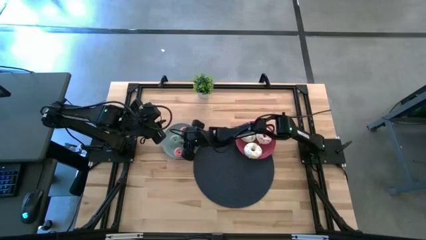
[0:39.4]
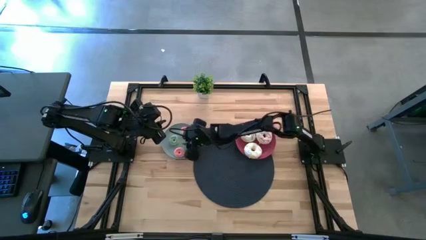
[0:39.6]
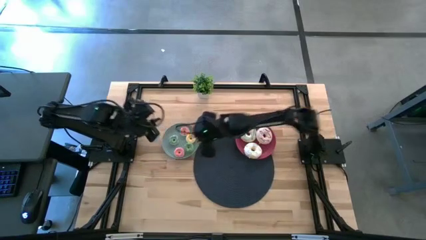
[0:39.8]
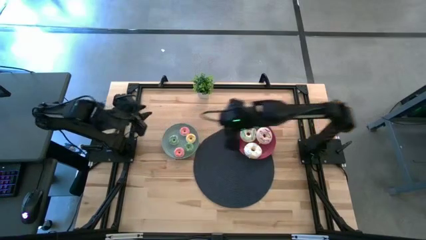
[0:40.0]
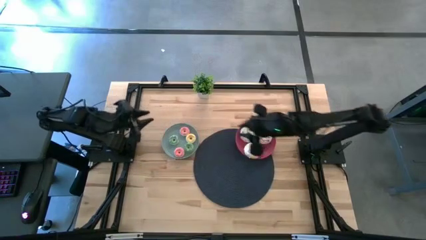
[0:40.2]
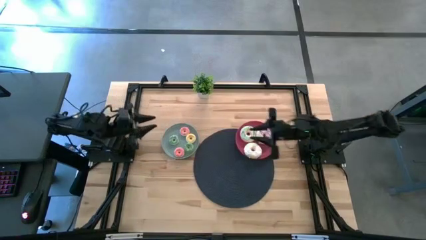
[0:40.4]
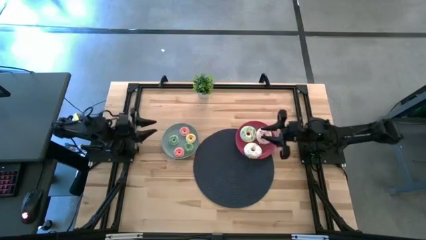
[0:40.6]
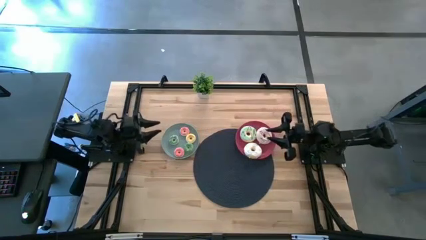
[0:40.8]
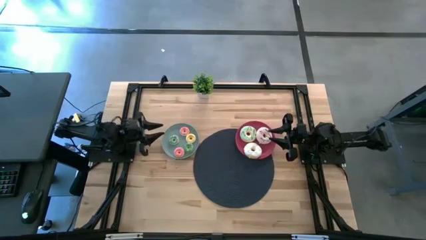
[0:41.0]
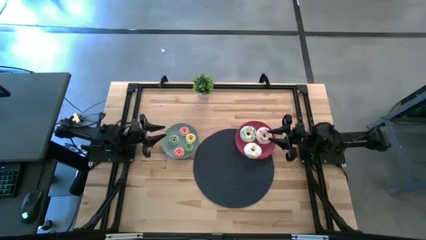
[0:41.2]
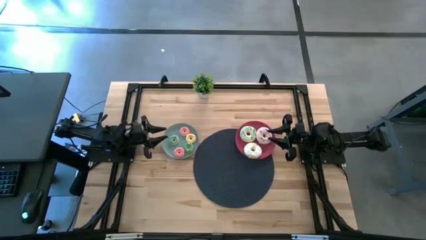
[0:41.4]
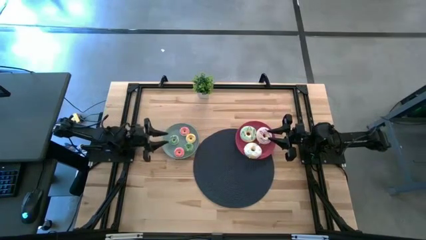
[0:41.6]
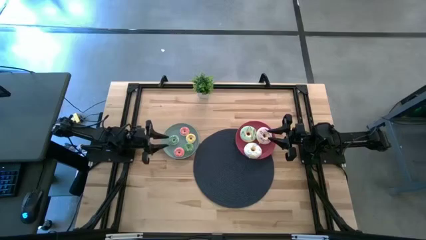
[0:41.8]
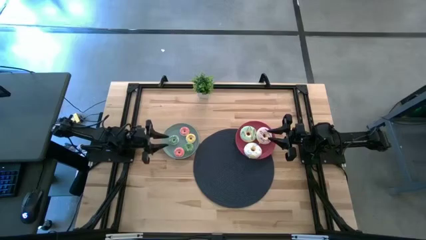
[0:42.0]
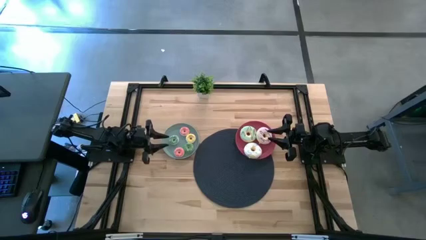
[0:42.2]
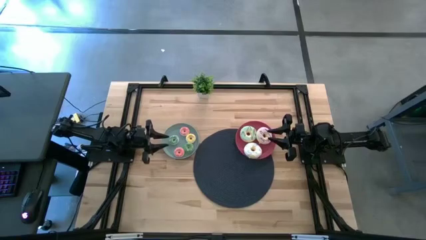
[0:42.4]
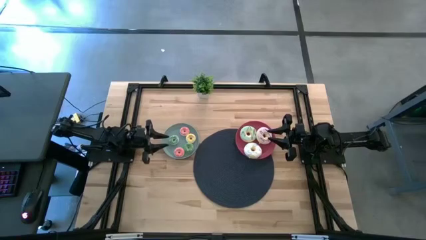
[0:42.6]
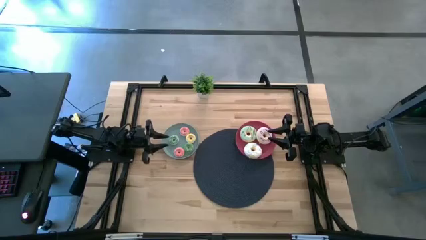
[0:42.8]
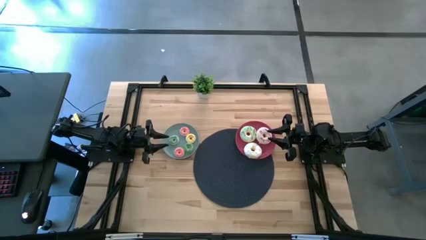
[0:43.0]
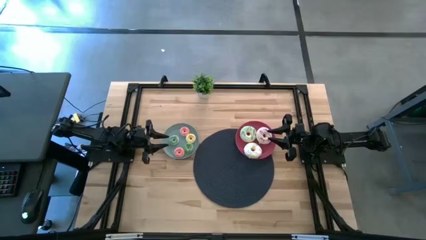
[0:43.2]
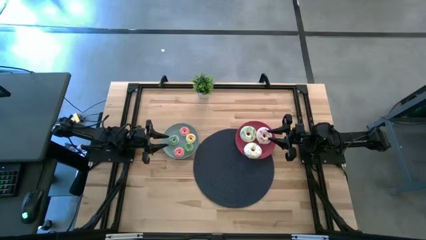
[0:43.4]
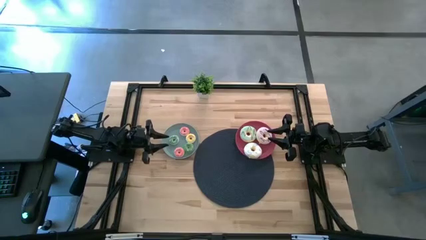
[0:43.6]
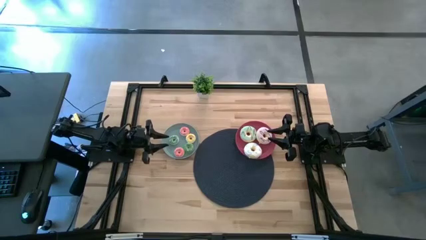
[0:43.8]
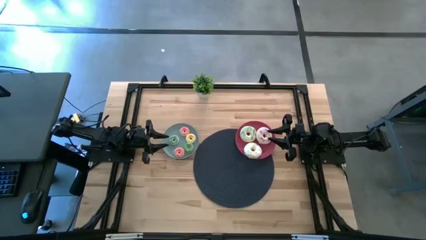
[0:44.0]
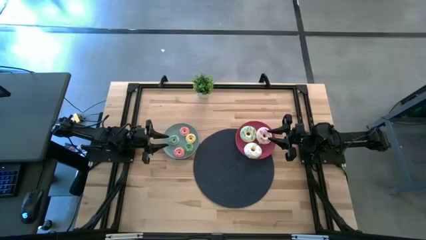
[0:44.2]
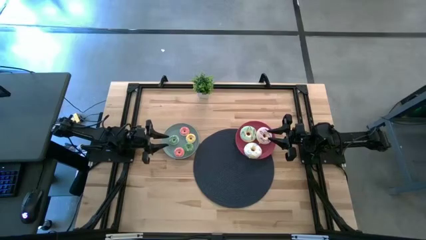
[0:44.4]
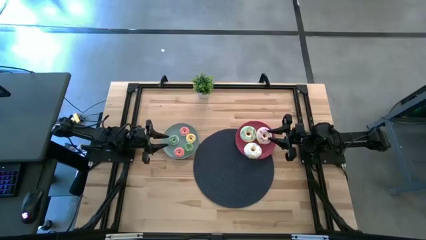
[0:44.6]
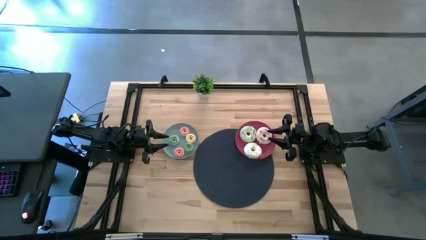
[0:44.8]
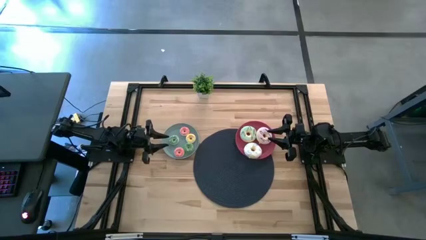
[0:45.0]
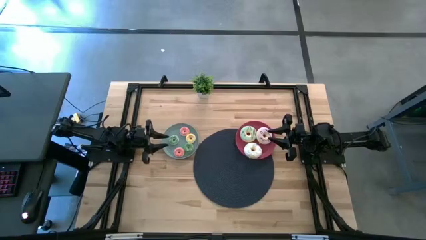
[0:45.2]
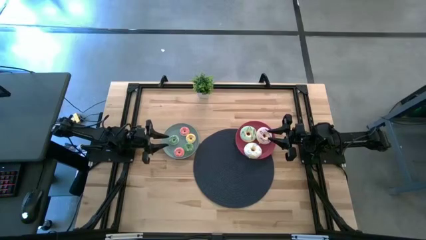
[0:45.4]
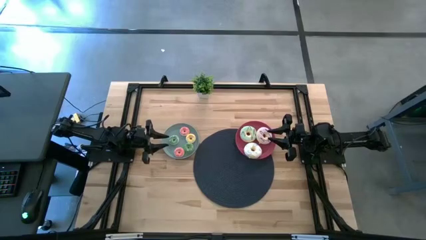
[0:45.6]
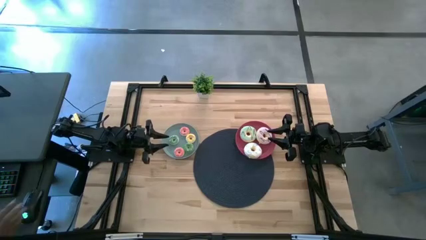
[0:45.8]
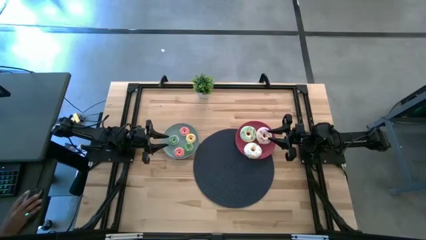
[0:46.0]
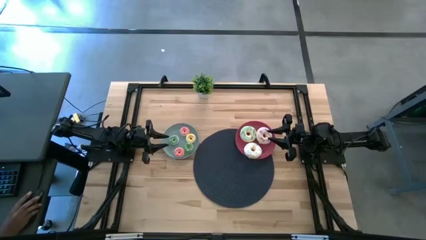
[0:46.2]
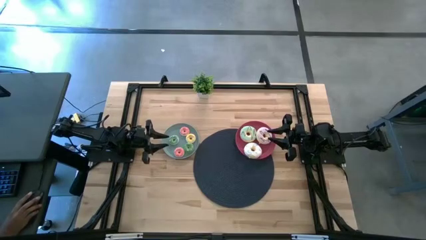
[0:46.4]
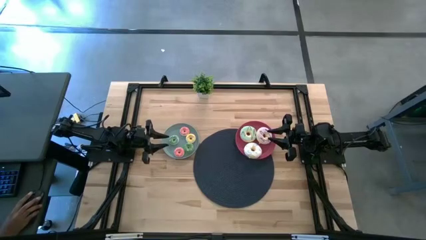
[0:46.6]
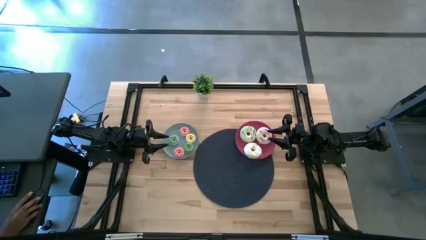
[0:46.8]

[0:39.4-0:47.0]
Task: Pick & Place donuts
Return to Home Position

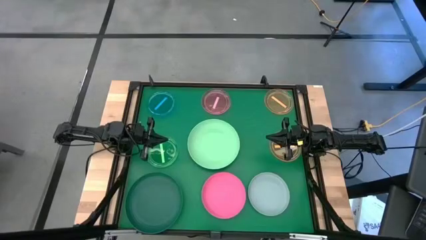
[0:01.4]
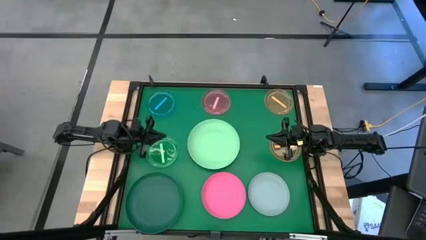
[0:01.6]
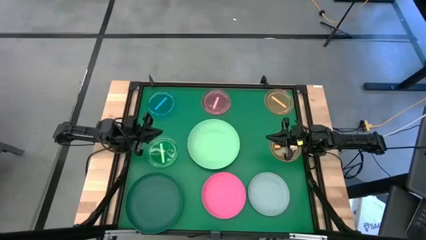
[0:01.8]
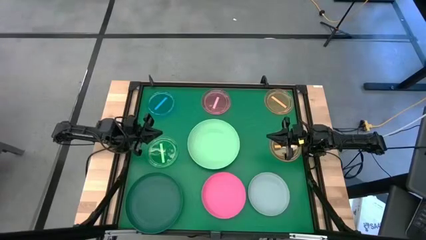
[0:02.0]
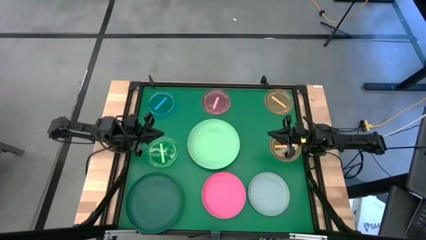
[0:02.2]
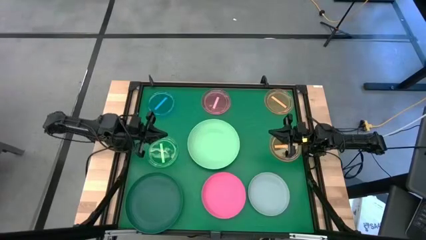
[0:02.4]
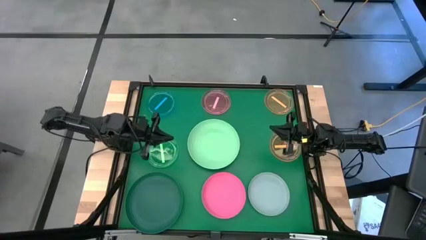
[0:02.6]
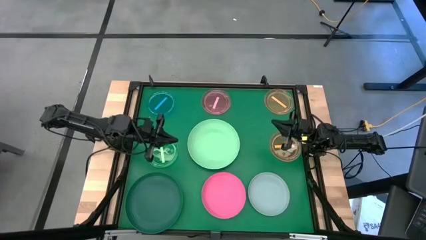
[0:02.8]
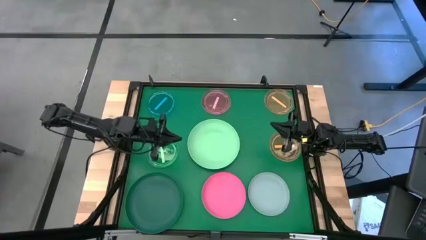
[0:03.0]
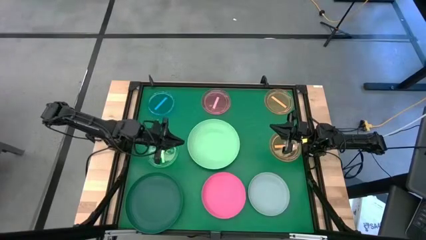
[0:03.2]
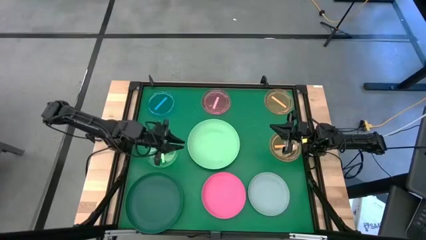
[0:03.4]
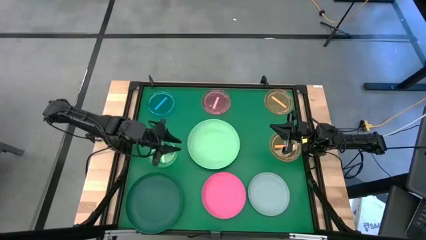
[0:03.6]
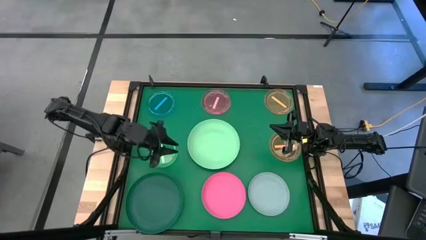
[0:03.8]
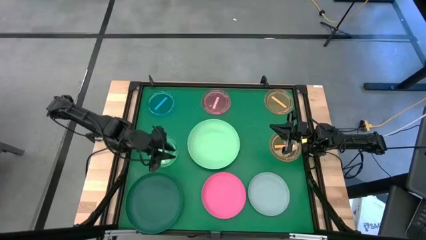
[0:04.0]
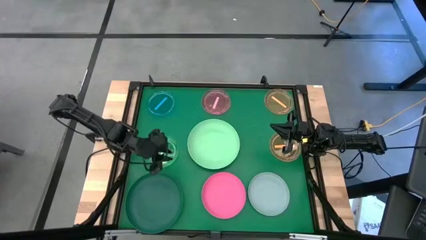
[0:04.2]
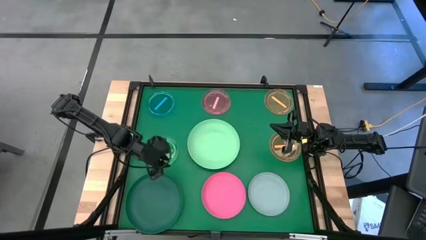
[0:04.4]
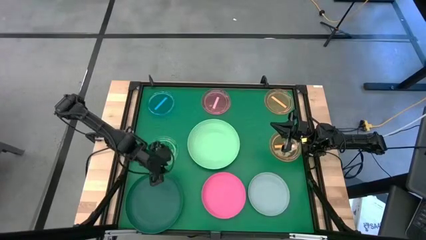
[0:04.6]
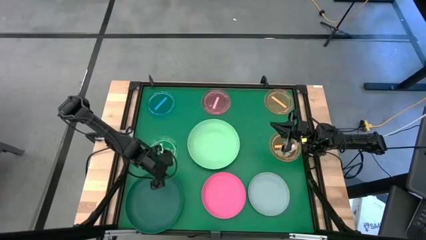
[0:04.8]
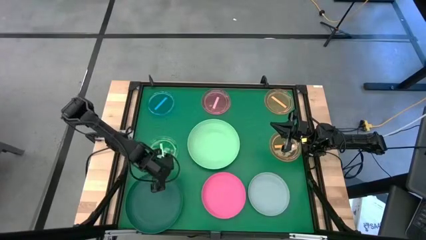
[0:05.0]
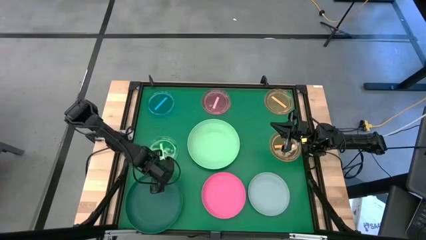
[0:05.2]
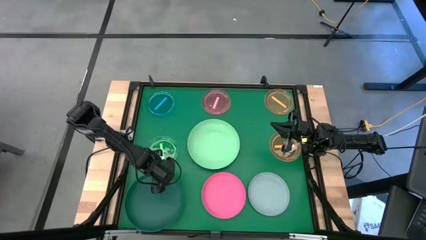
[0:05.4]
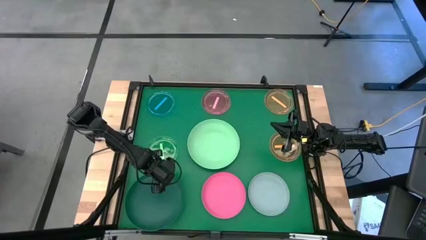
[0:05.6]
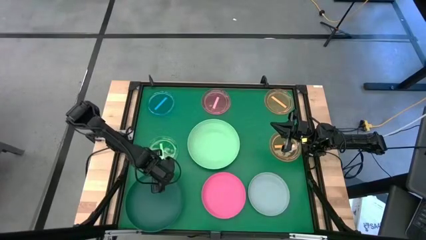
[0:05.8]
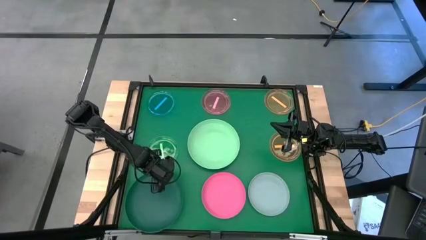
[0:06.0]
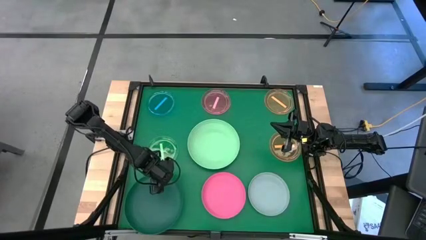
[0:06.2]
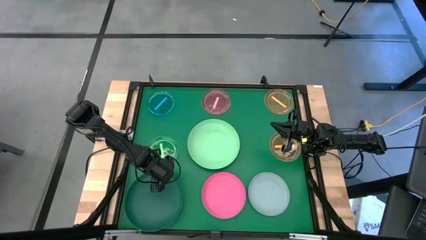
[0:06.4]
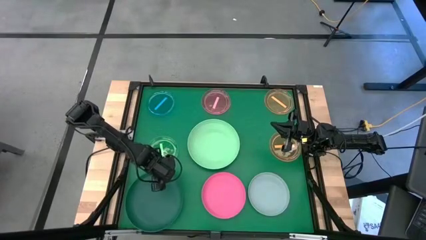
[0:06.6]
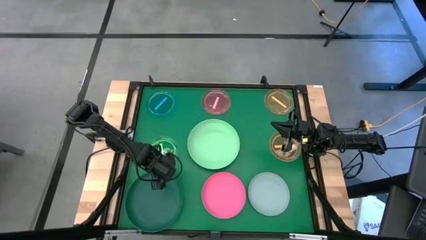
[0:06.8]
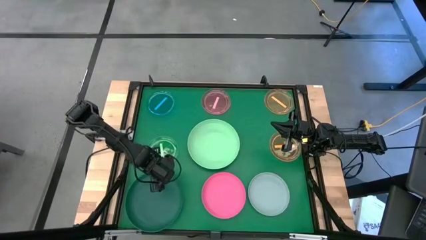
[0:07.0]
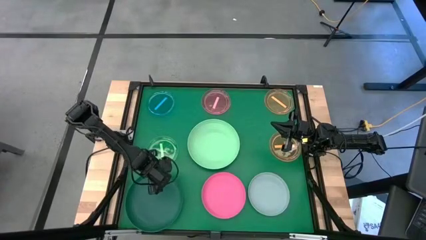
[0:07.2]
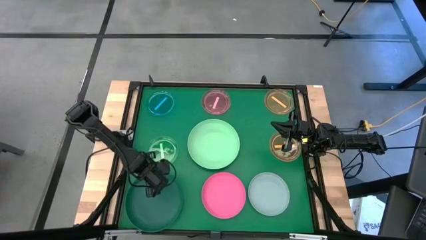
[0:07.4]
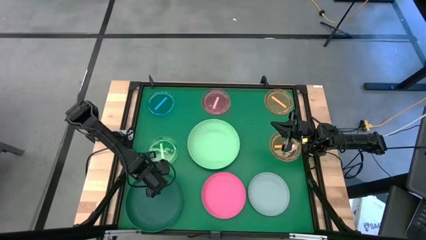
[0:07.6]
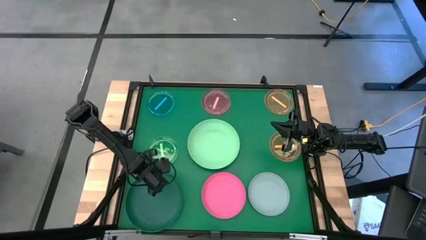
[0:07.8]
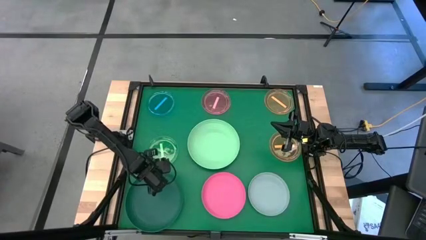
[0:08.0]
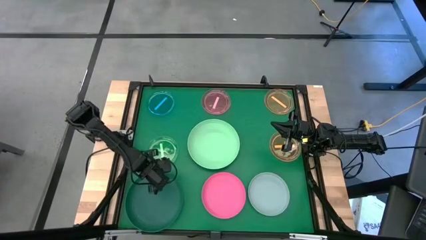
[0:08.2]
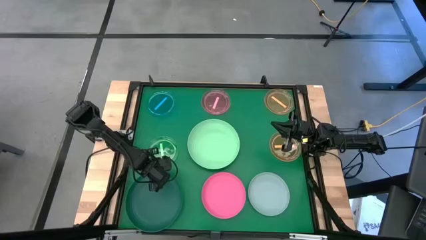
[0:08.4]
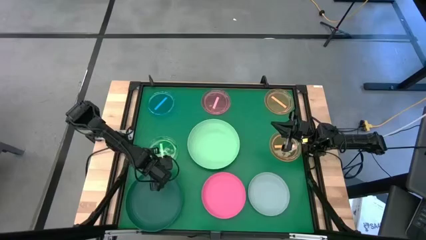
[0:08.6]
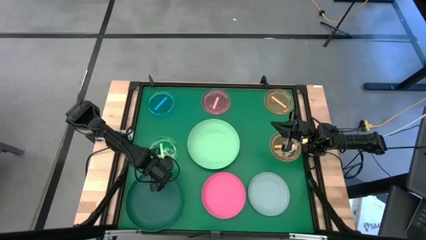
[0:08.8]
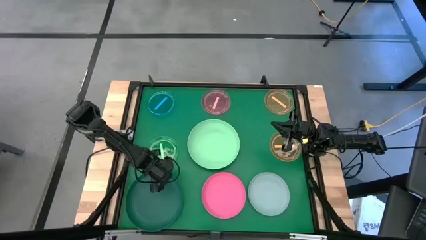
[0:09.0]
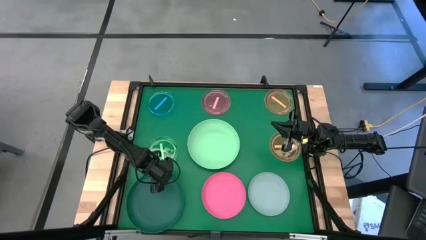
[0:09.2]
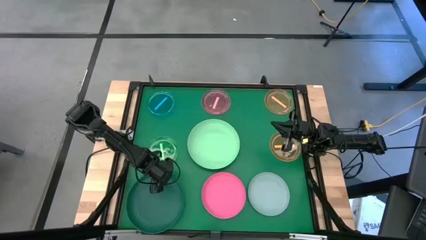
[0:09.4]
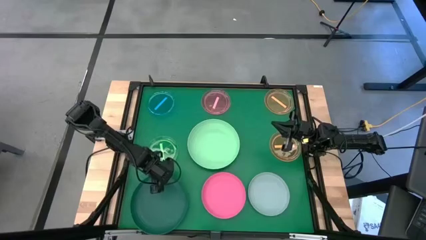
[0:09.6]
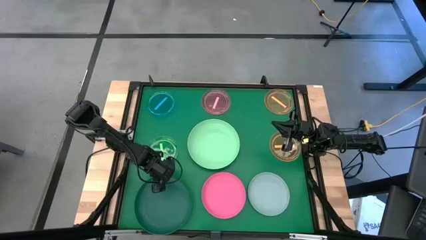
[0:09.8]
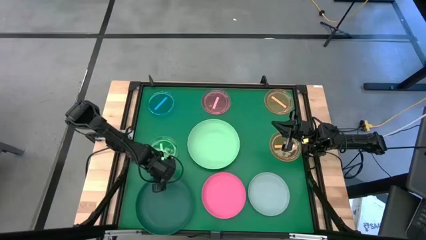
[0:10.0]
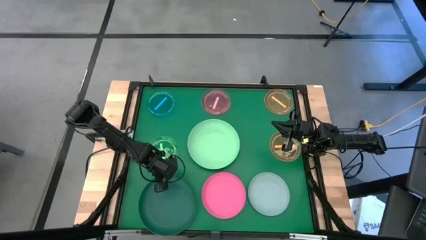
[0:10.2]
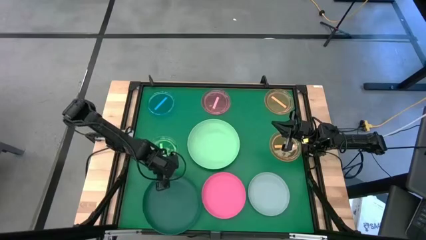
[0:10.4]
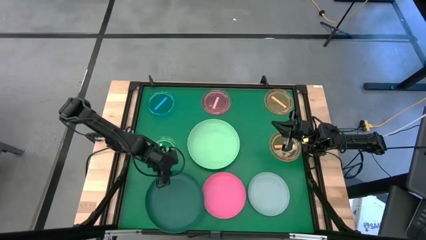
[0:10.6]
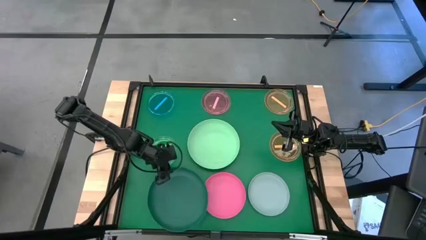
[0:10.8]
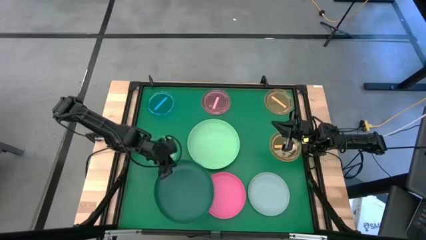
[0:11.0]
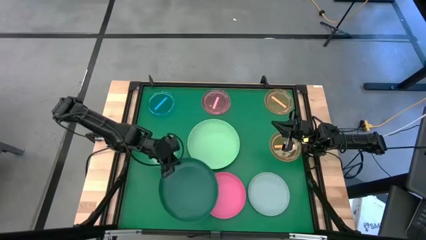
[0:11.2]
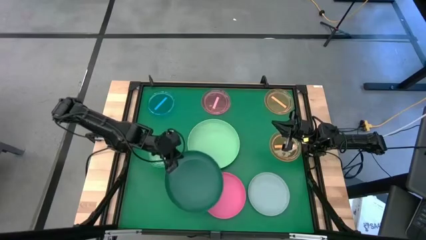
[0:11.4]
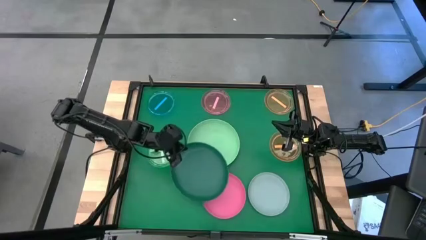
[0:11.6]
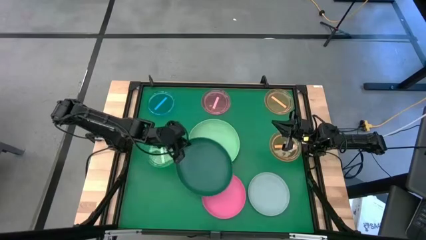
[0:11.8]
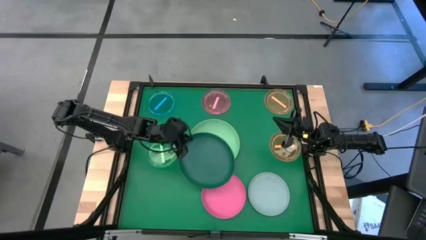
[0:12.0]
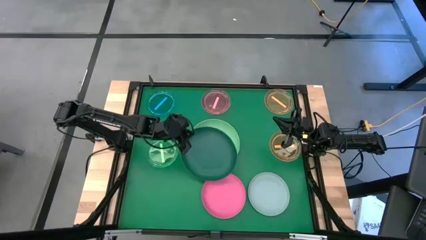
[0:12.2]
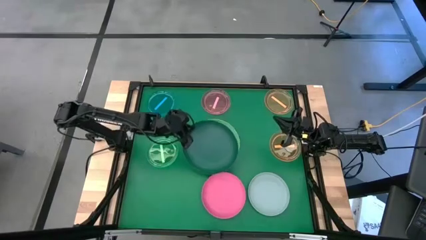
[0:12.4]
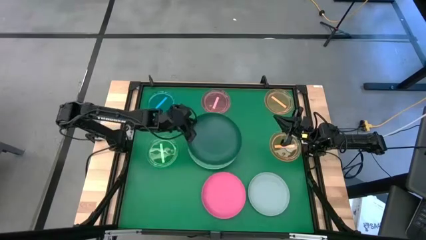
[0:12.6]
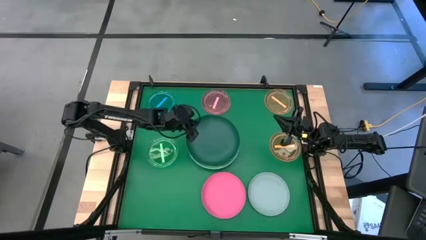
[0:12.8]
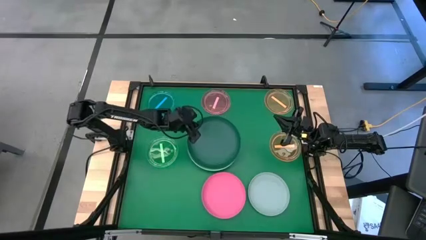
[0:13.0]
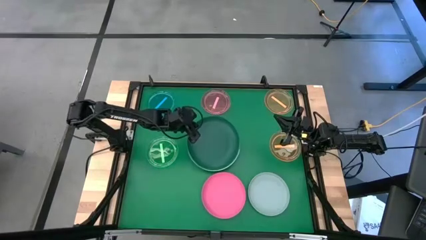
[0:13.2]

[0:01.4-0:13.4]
Task: Stack plastic plates
Stack the dark green plate on top of the light green plate
